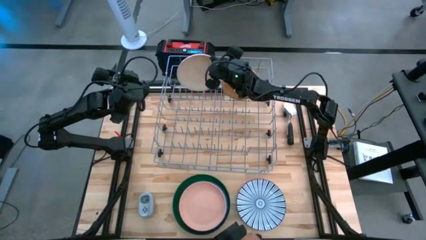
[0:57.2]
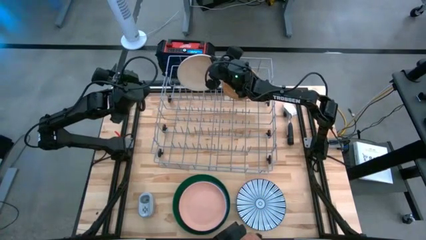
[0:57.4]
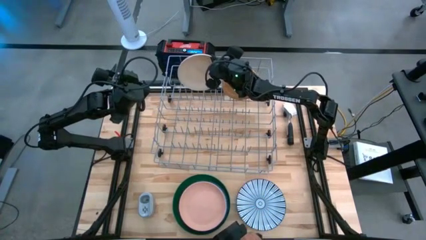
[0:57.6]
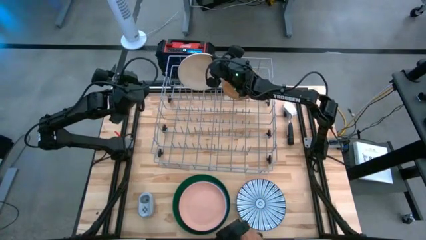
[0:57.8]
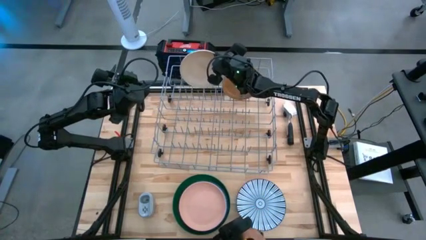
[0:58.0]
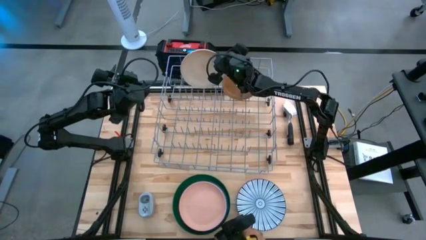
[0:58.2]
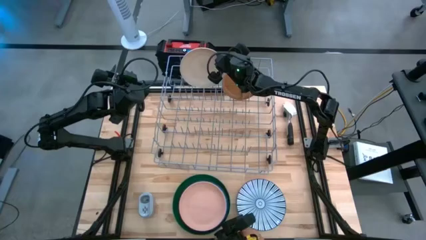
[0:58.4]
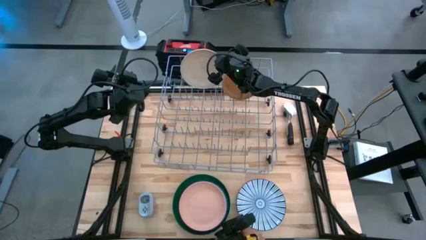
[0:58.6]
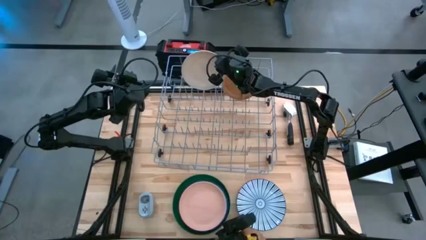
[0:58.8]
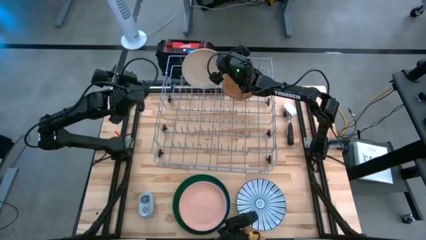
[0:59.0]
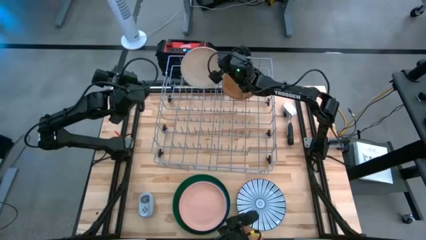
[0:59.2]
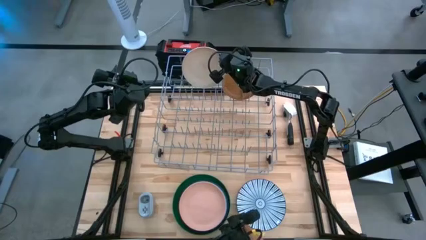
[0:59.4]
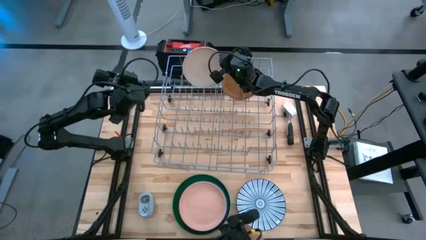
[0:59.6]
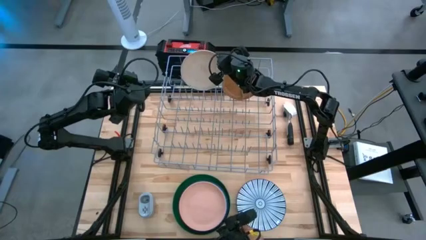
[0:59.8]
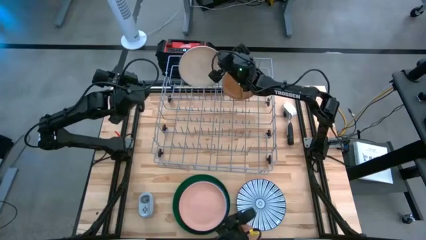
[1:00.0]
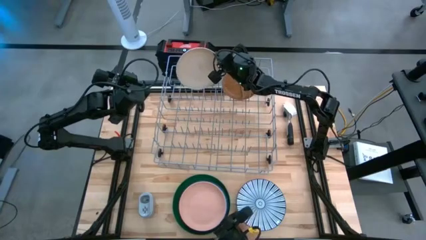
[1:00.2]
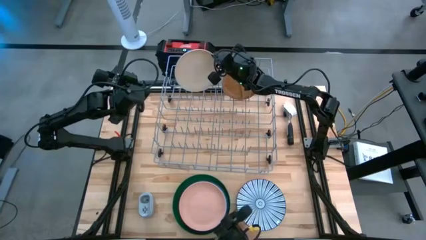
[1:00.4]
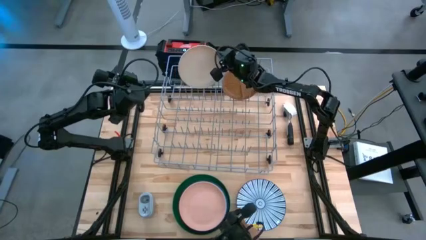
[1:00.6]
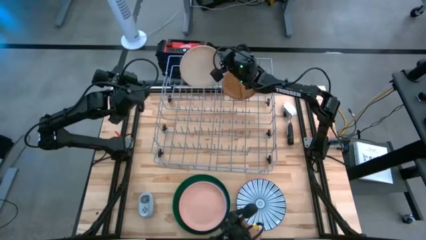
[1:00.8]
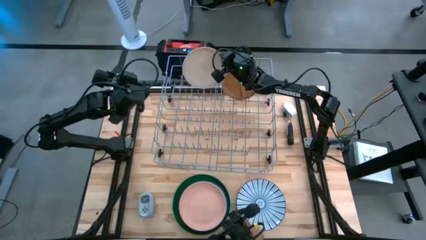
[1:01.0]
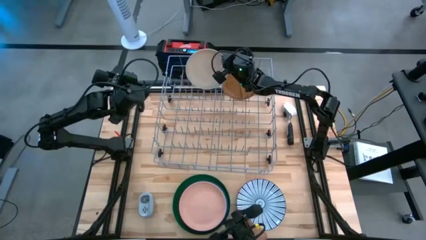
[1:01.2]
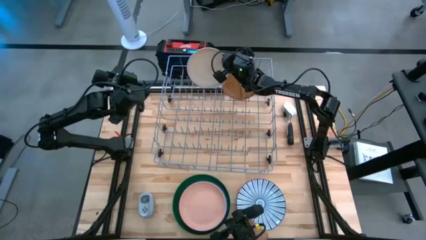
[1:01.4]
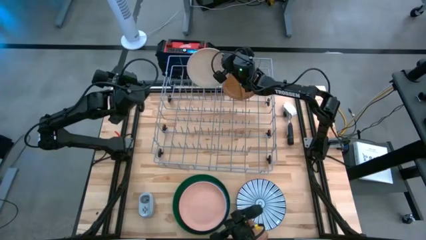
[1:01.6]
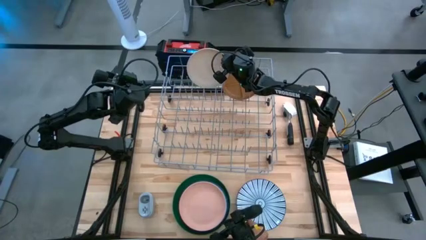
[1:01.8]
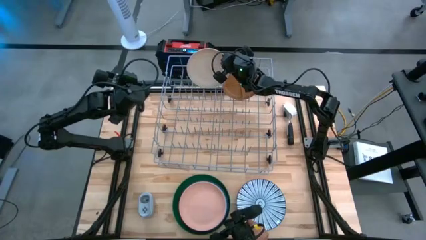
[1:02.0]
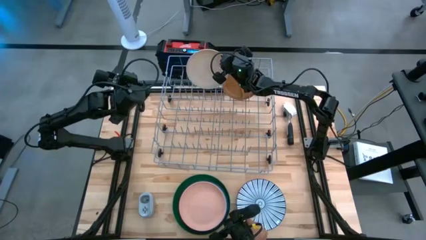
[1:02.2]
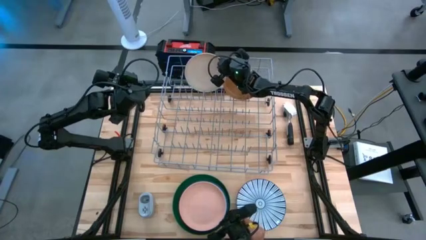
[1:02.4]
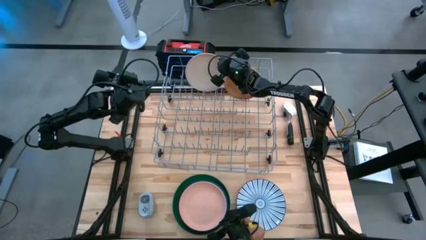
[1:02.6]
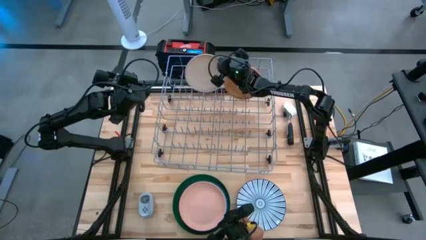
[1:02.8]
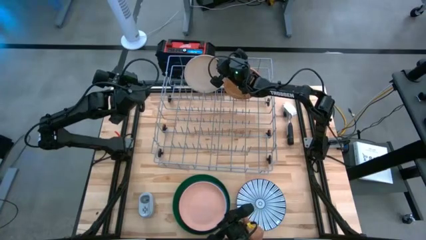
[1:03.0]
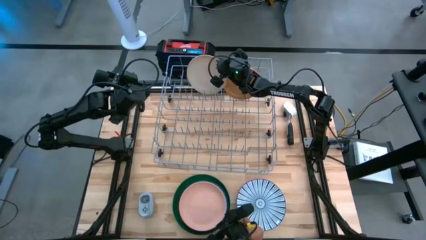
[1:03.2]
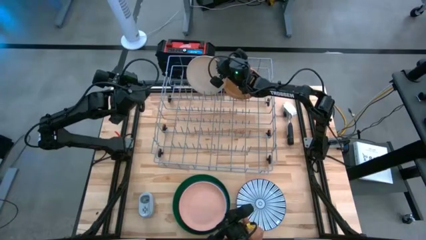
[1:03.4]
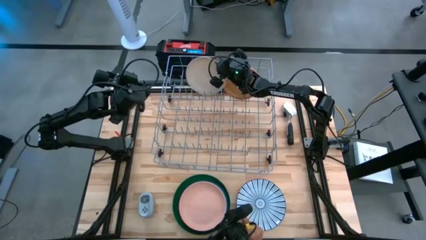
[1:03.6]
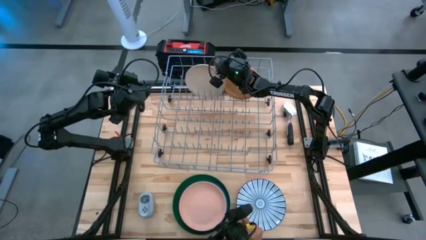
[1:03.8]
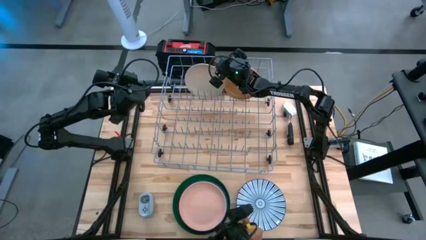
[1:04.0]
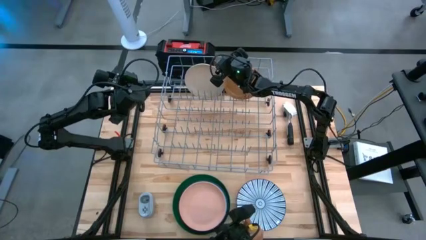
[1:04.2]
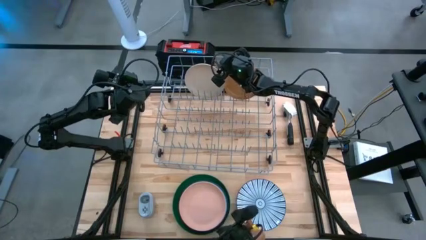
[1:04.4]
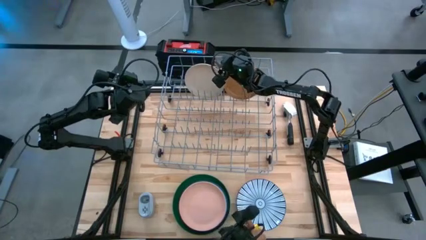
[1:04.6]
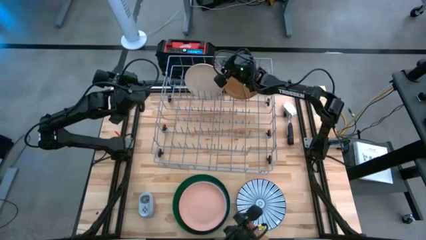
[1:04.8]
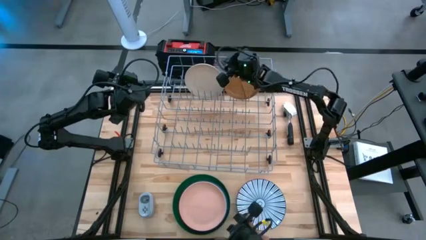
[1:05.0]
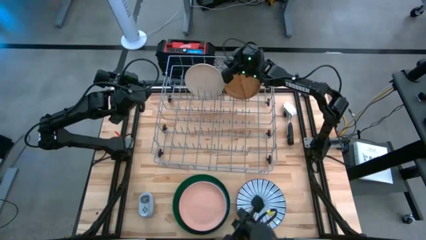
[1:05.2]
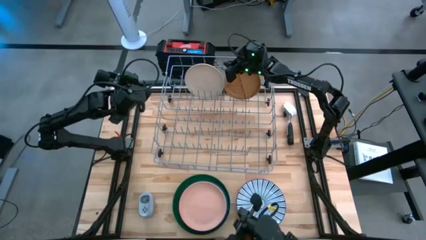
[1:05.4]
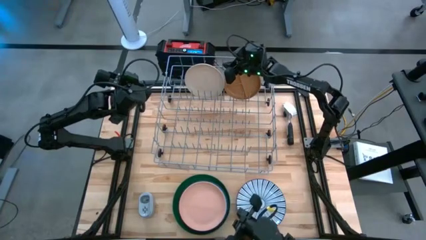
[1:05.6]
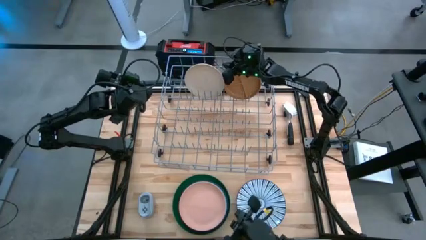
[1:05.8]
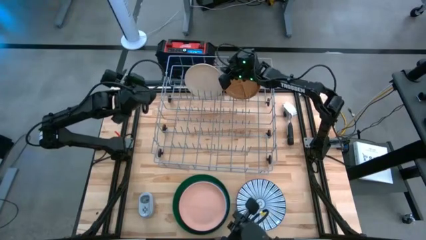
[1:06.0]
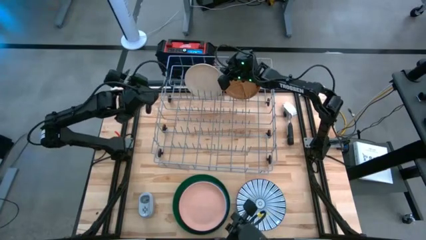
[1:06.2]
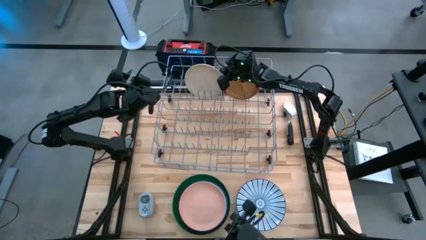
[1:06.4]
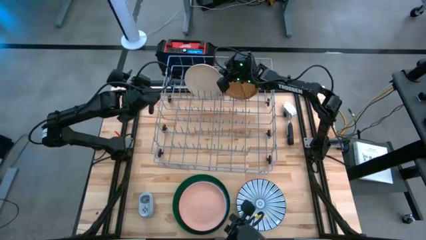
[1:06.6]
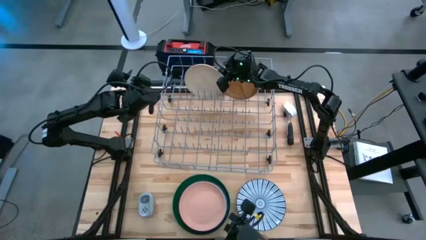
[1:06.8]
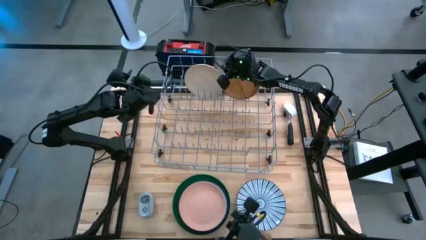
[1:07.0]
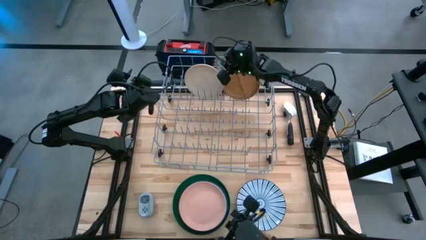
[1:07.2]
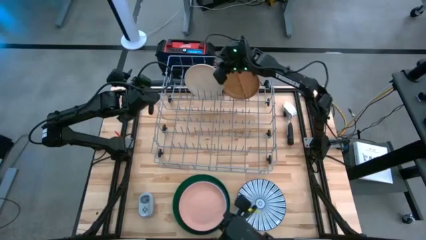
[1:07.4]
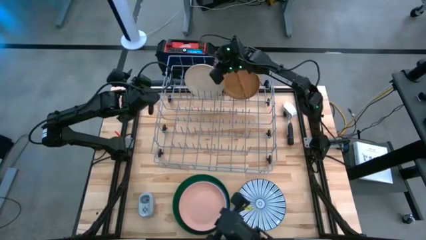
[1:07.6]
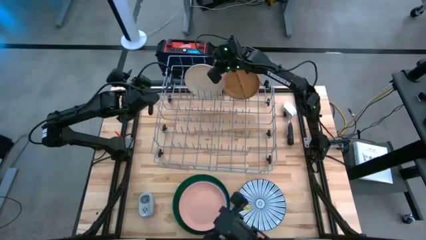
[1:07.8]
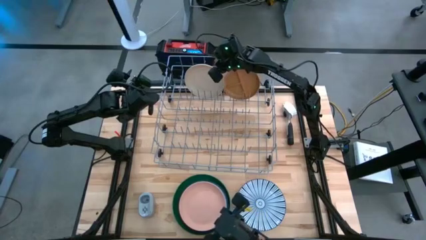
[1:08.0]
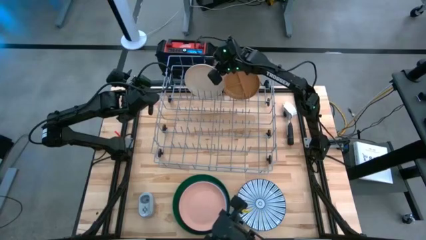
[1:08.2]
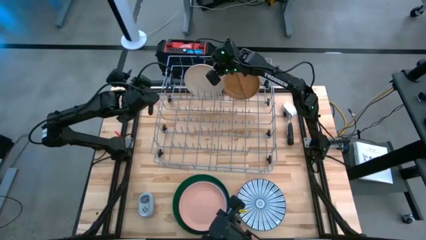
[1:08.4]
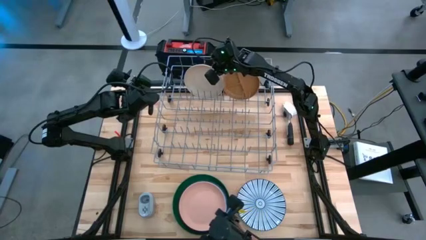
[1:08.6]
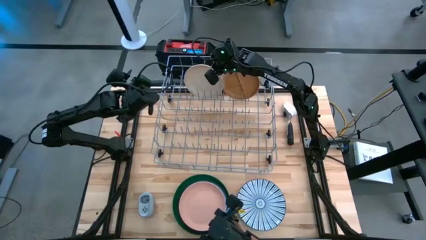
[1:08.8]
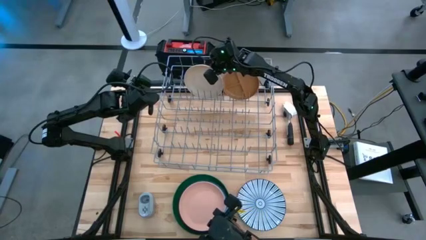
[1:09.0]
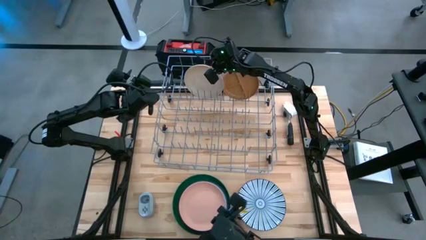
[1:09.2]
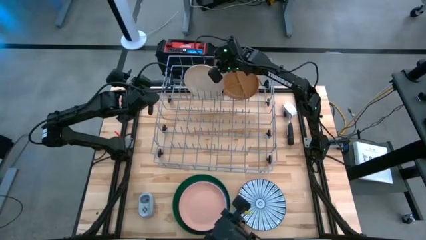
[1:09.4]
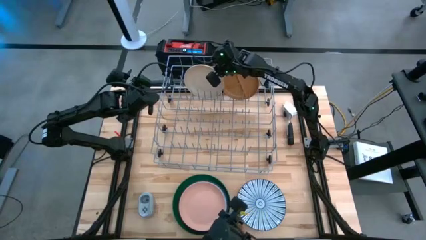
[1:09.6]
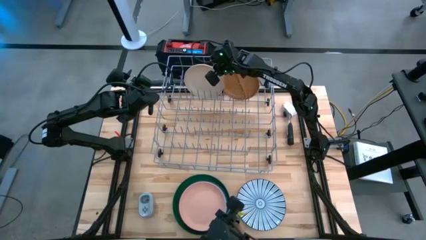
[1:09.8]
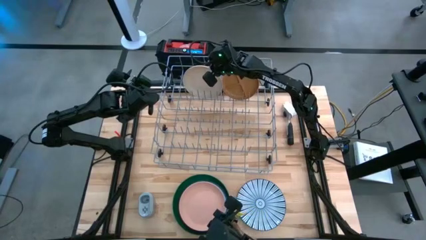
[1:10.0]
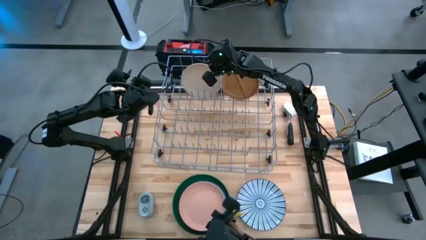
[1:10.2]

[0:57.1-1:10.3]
Task: Sort dishes
Put the white plate into the dish rack
